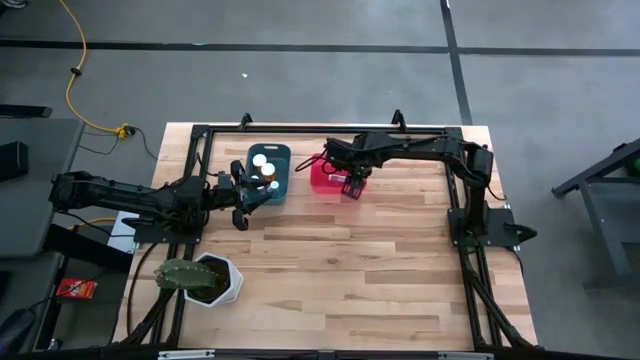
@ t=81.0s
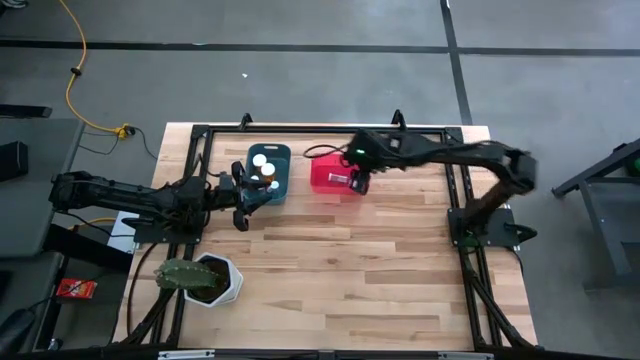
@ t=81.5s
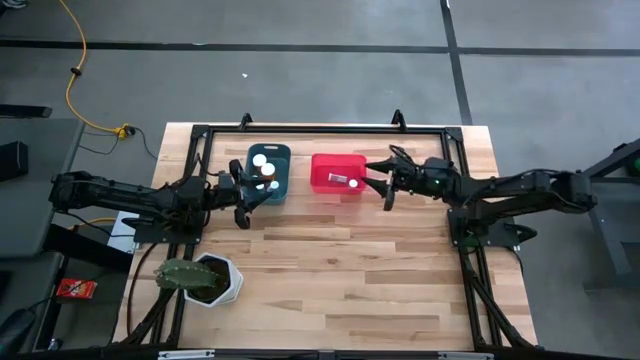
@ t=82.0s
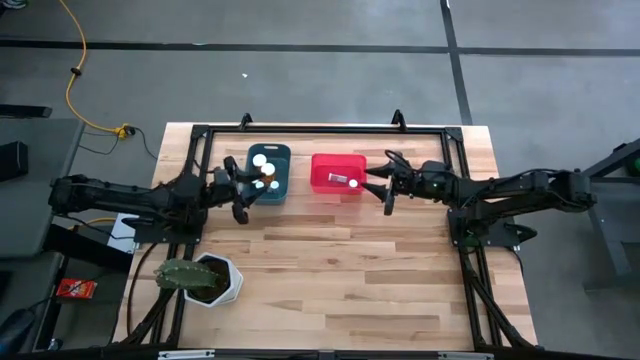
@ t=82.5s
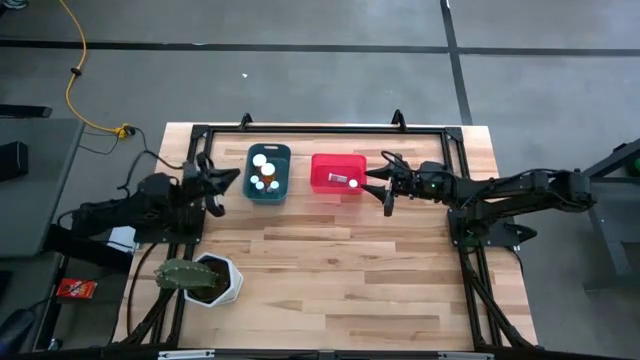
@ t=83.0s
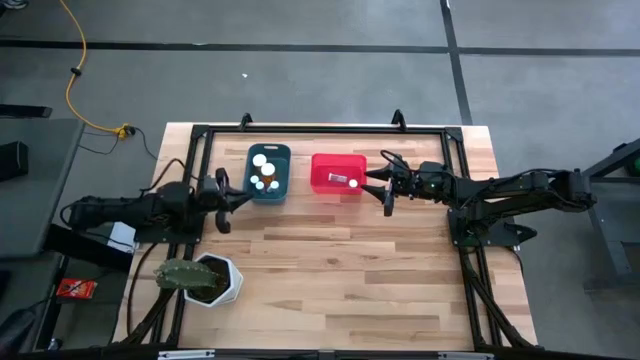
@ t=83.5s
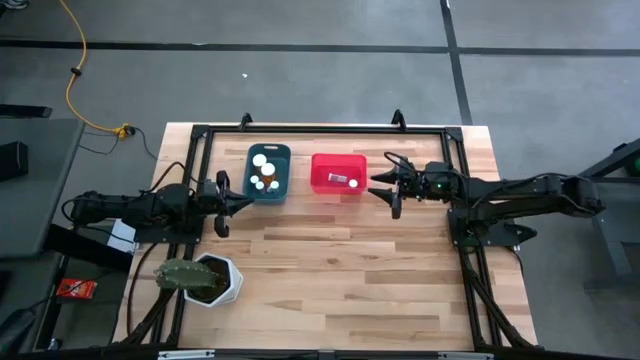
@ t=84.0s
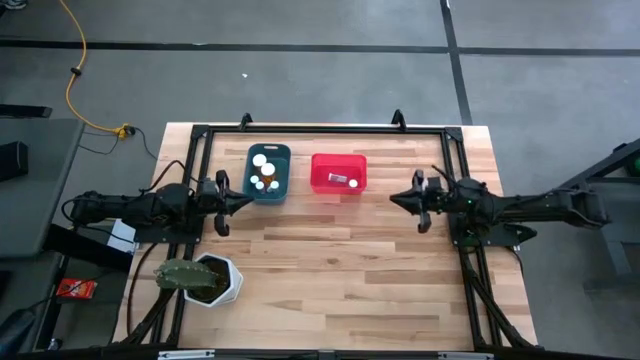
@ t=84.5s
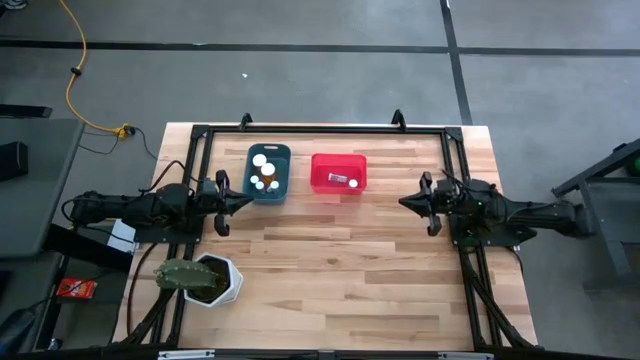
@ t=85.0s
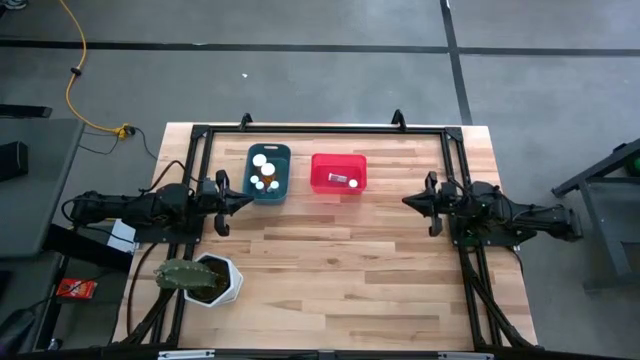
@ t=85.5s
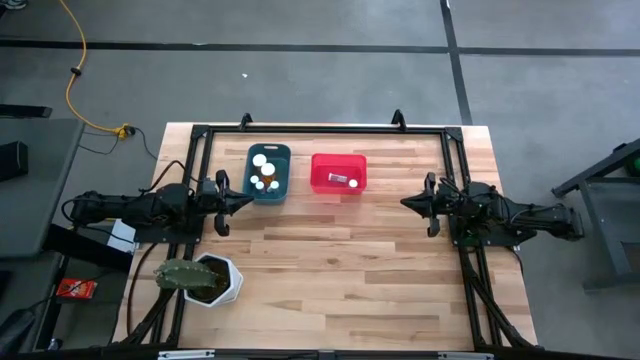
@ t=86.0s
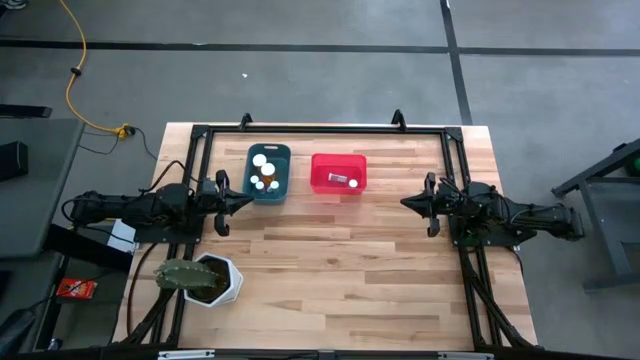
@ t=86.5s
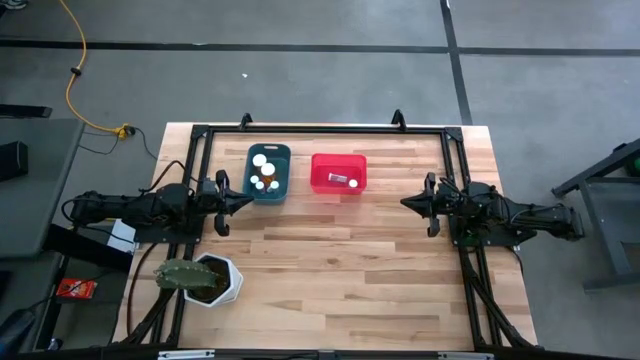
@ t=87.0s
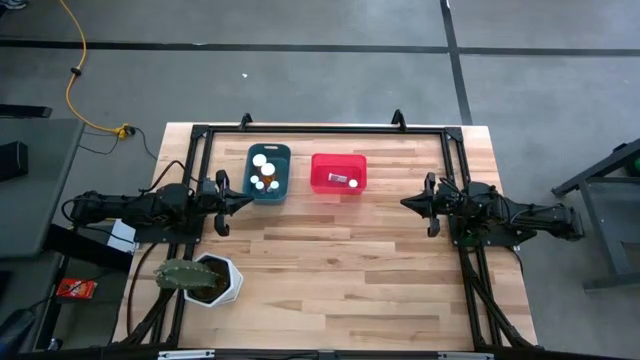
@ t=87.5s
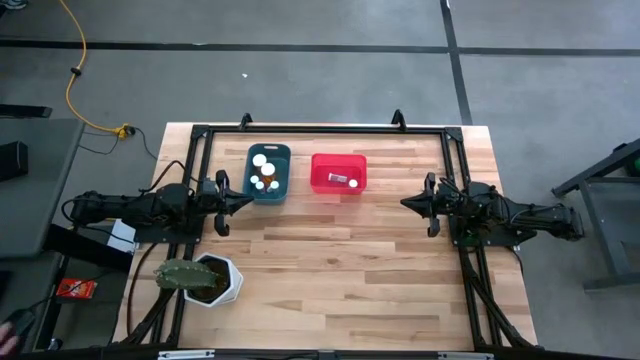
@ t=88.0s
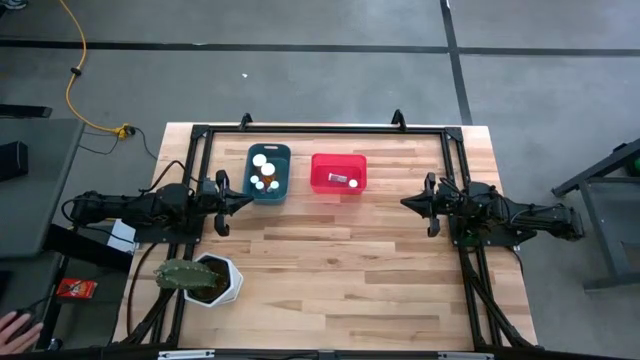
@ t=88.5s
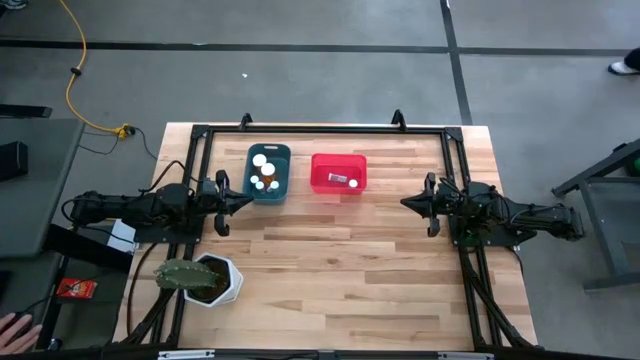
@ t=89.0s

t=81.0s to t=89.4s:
Task: Pick and place medicine bottles into bin by pill shape (circle, oval)
Return to Home Position

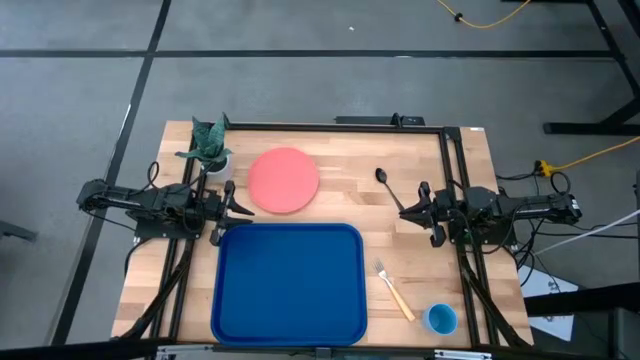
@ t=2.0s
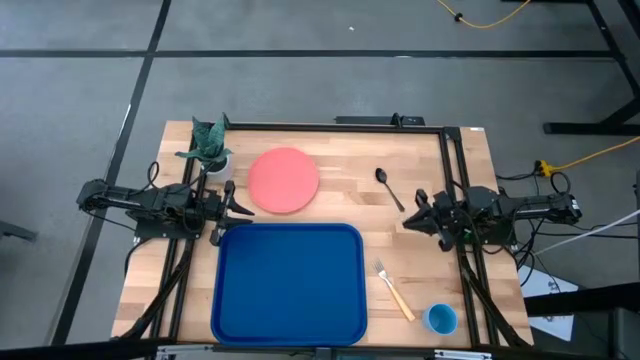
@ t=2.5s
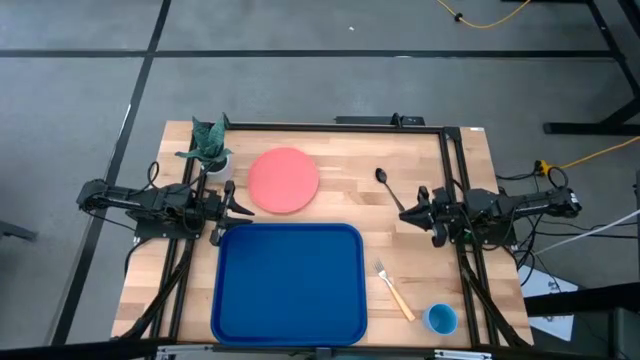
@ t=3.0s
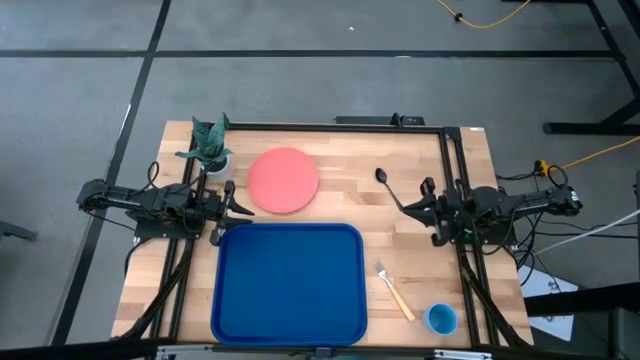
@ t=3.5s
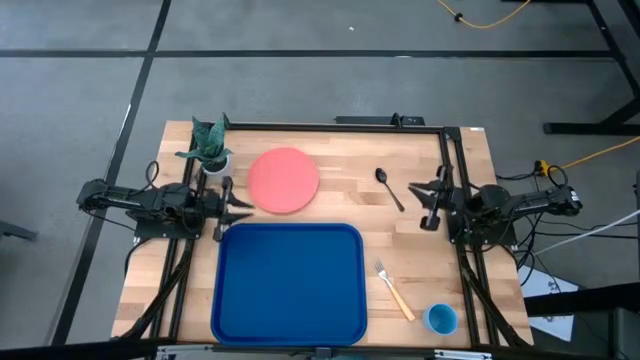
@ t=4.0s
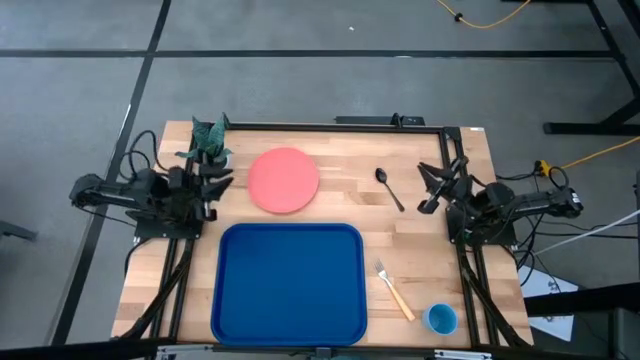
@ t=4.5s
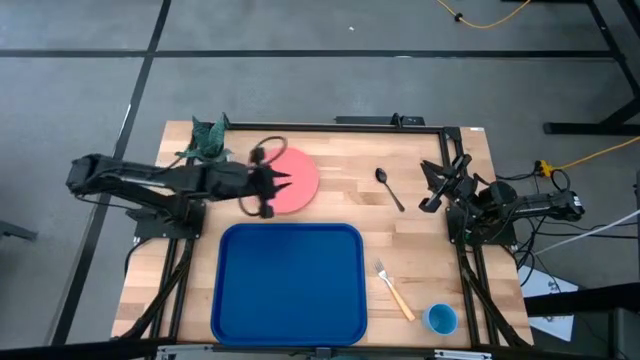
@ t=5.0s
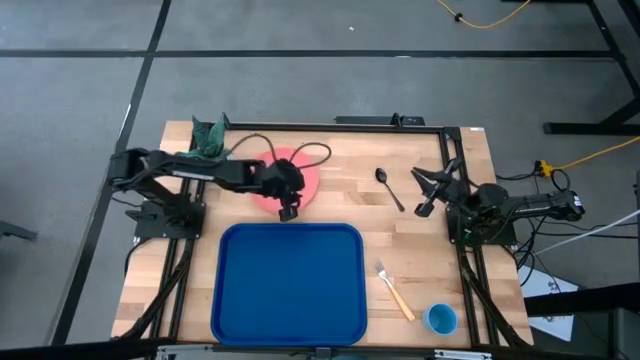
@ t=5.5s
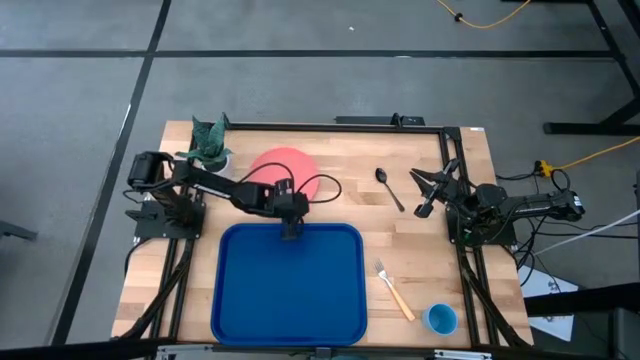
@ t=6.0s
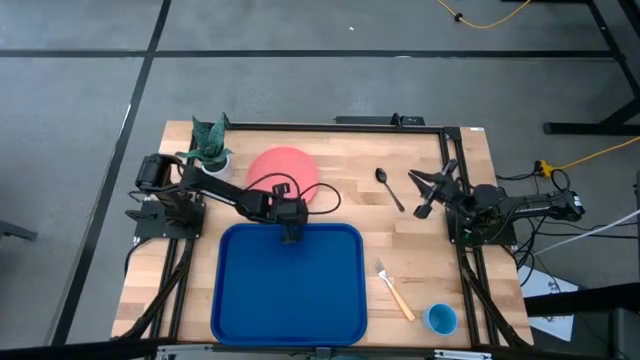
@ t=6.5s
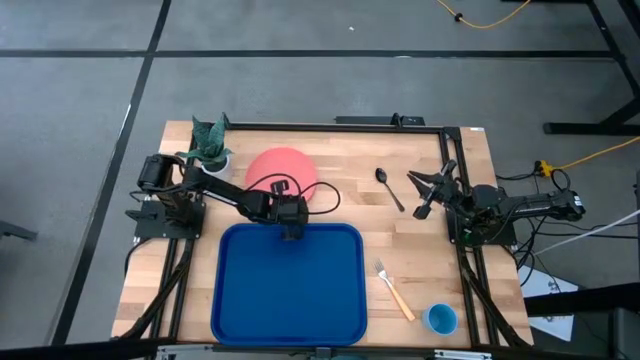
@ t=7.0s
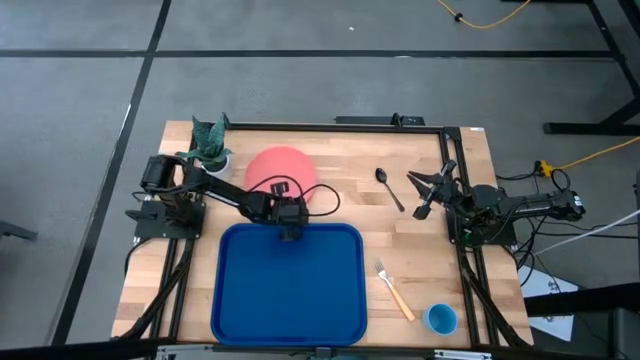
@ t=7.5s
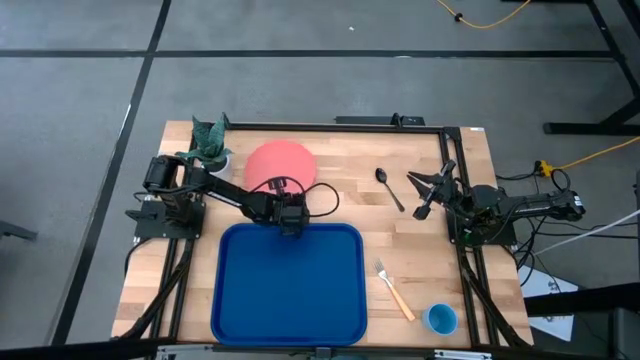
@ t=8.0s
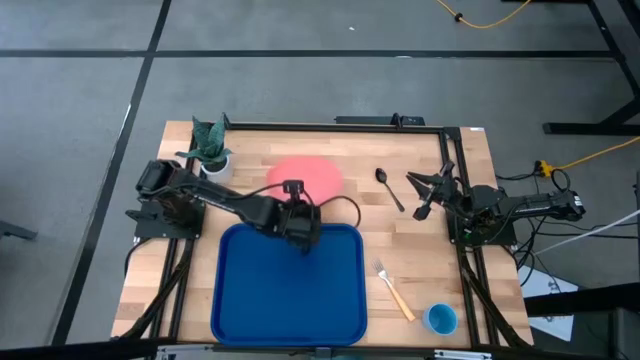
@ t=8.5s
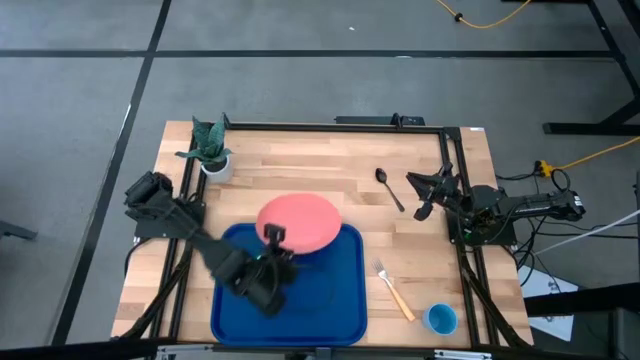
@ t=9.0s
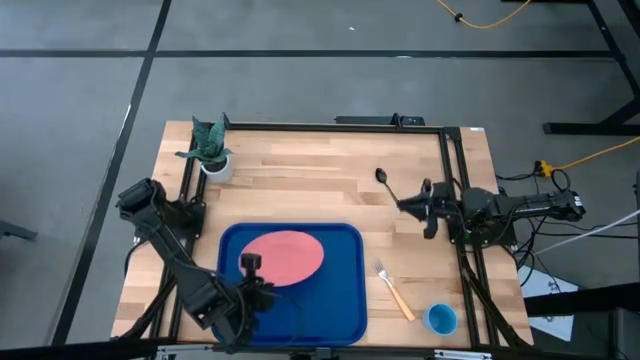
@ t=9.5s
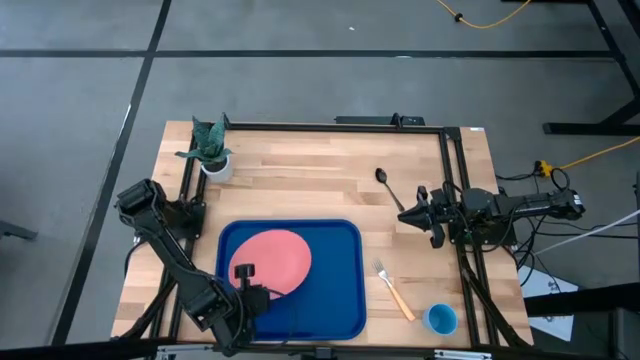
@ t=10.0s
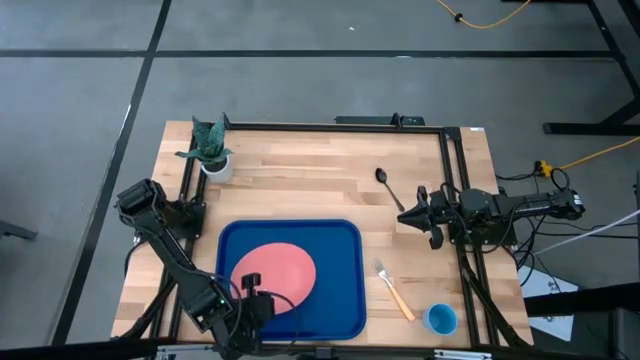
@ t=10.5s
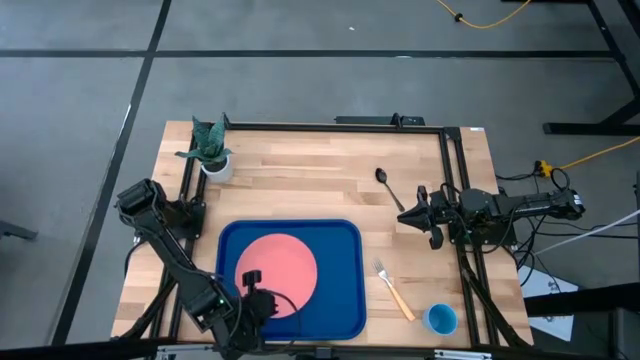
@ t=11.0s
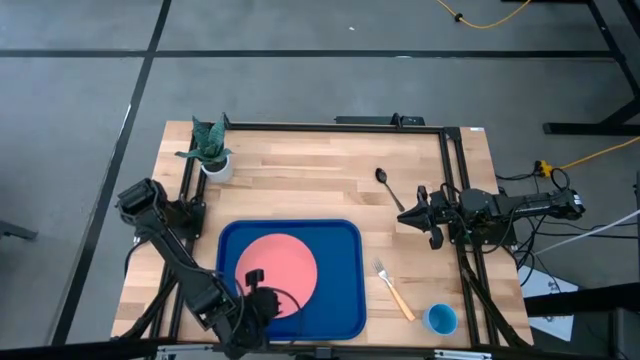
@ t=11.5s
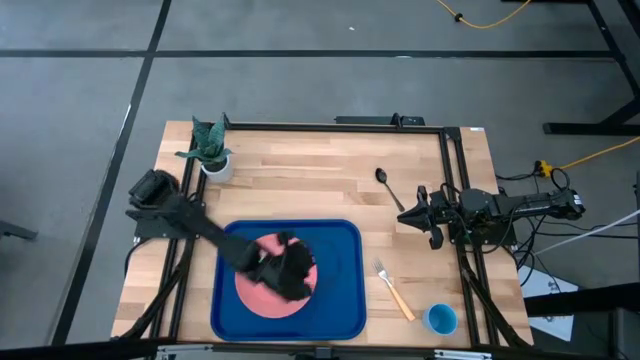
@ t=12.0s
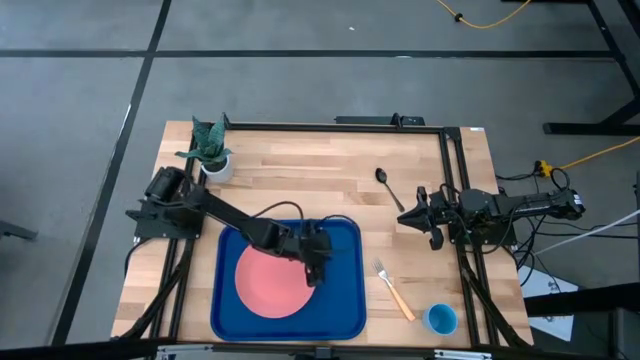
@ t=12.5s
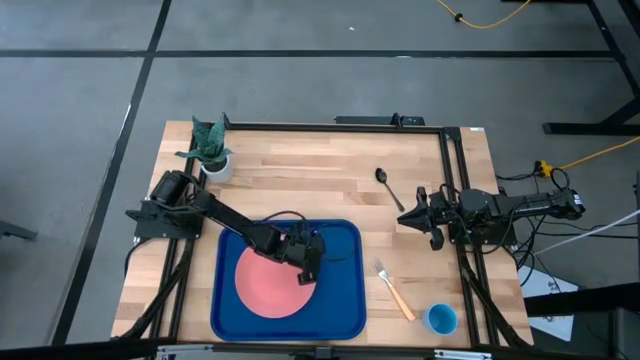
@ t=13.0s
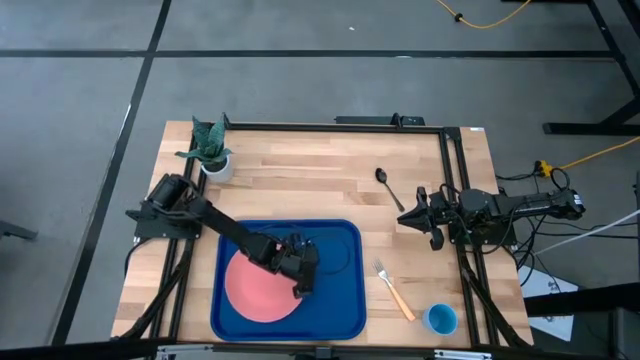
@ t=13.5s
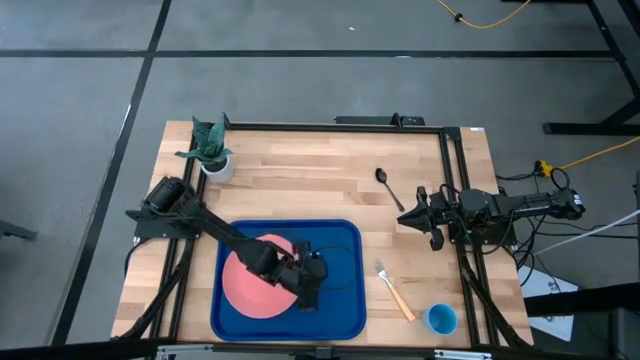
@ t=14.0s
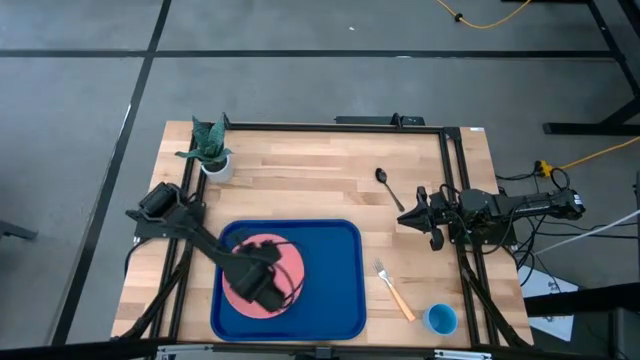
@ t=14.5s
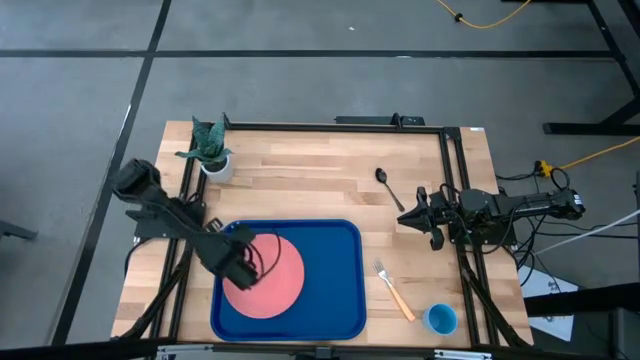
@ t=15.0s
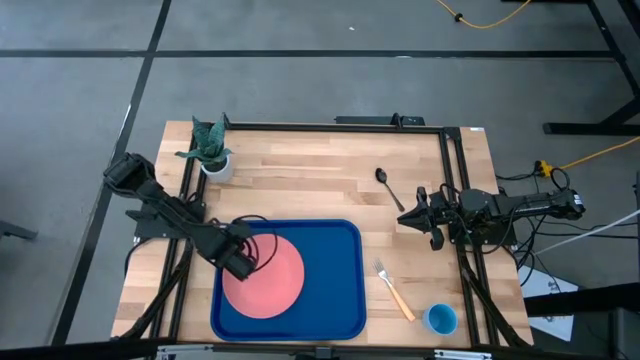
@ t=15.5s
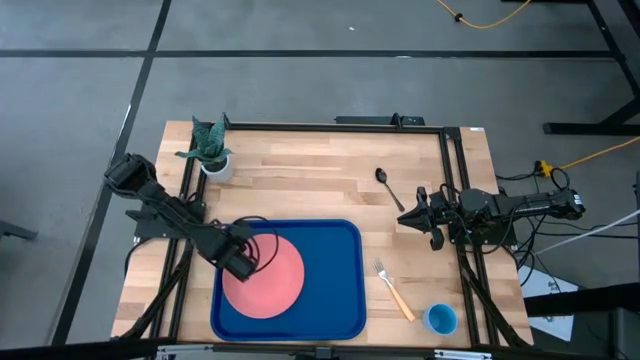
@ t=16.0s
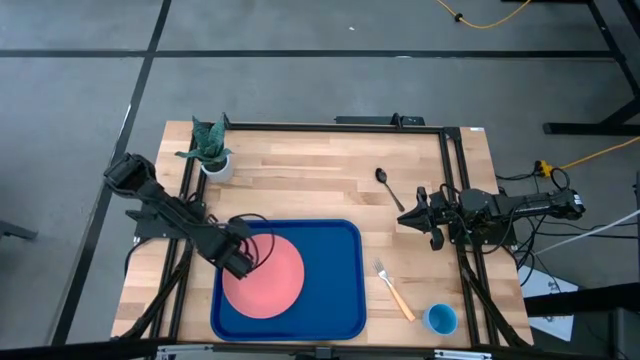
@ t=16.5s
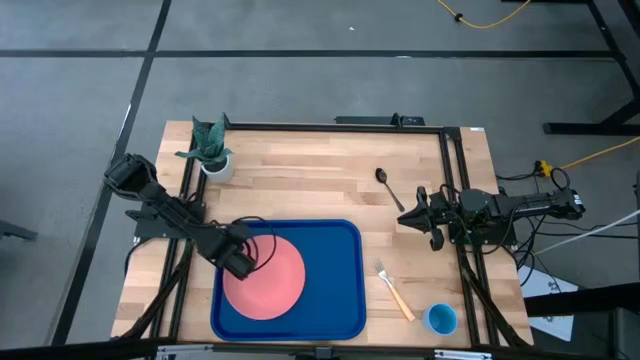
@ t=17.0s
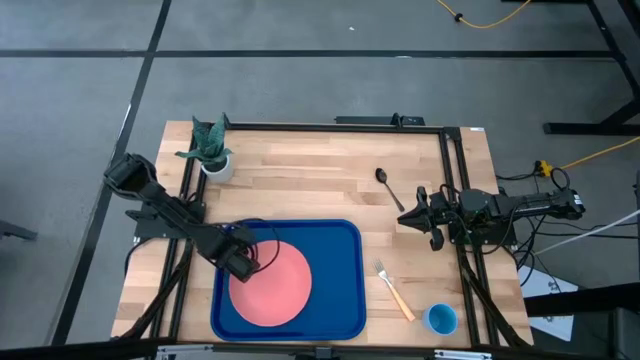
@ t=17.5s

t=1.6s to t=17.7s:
Task: Pick and place plate/cup/fork/spoon on tray
Put the pink plate on the blue serving tray
